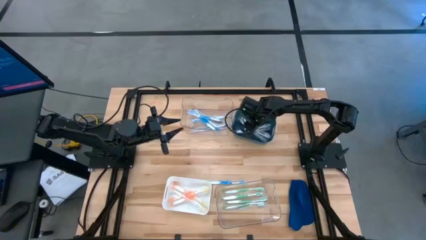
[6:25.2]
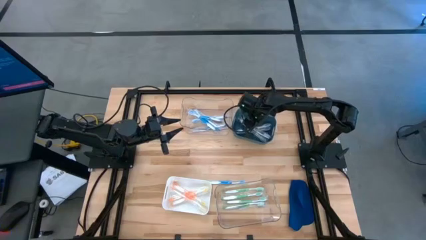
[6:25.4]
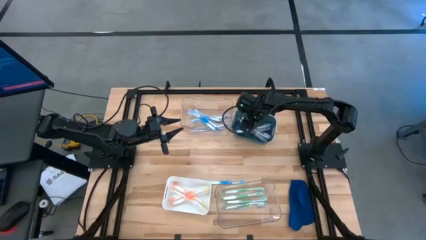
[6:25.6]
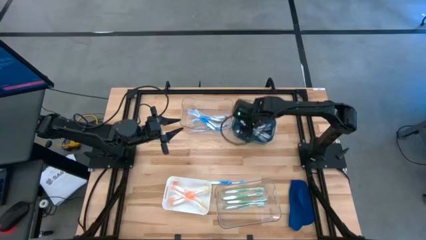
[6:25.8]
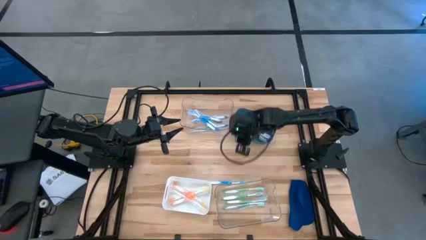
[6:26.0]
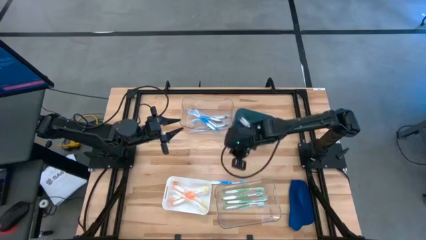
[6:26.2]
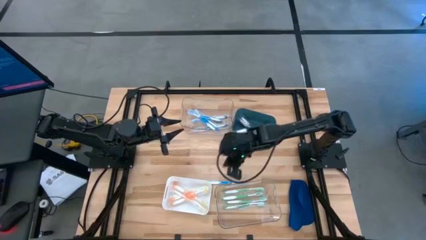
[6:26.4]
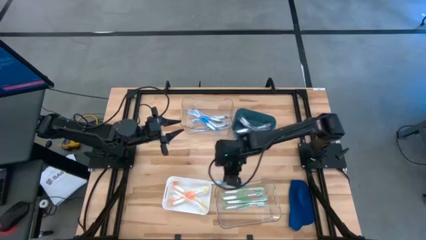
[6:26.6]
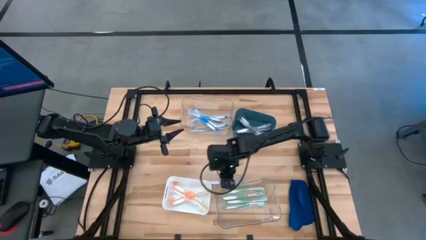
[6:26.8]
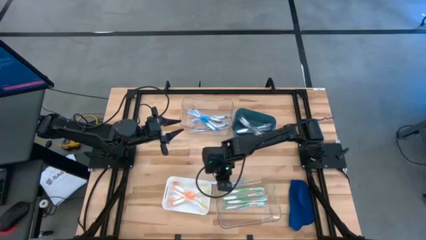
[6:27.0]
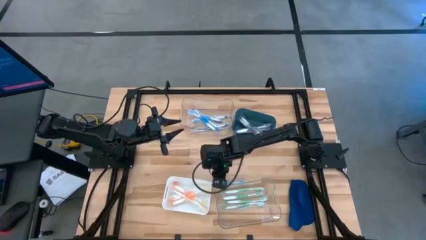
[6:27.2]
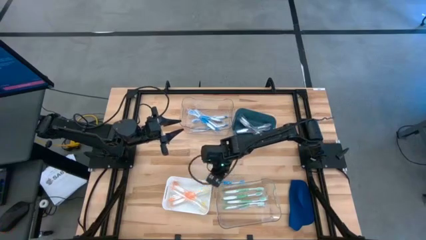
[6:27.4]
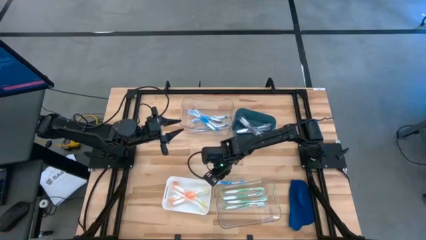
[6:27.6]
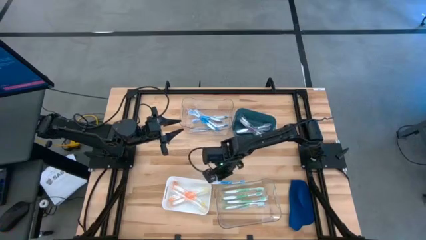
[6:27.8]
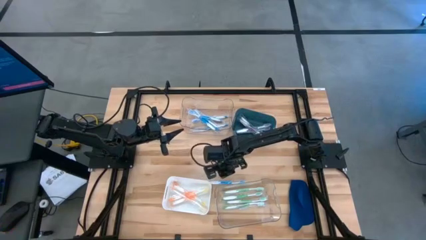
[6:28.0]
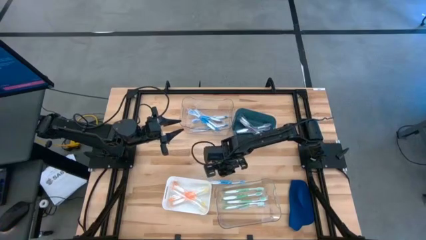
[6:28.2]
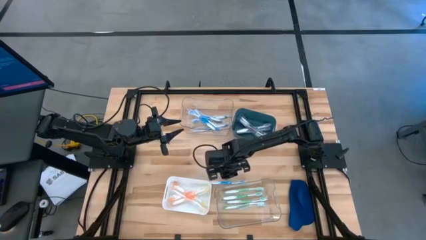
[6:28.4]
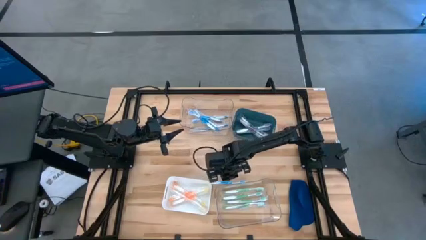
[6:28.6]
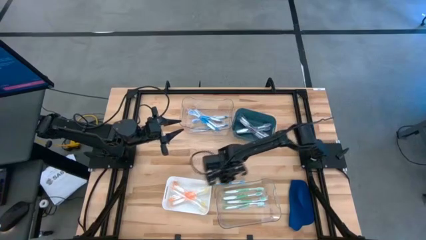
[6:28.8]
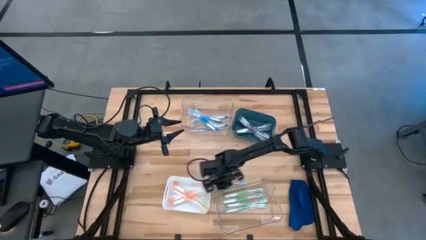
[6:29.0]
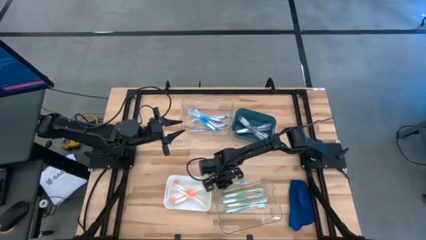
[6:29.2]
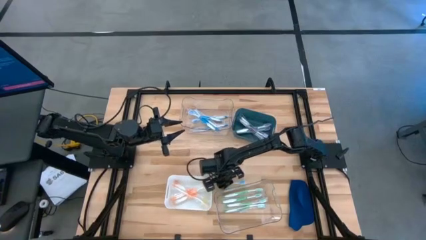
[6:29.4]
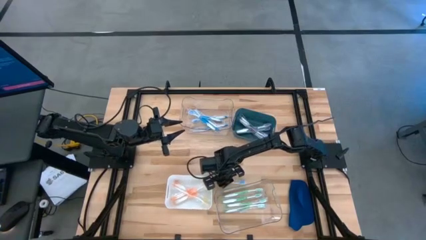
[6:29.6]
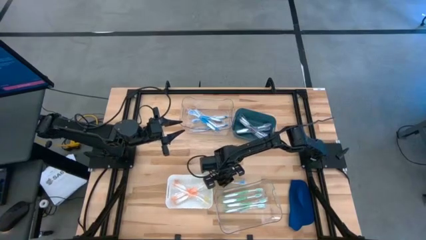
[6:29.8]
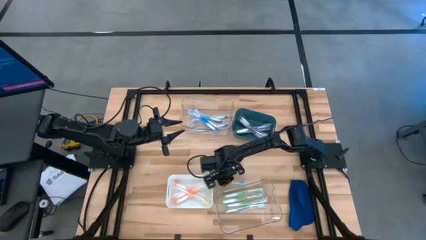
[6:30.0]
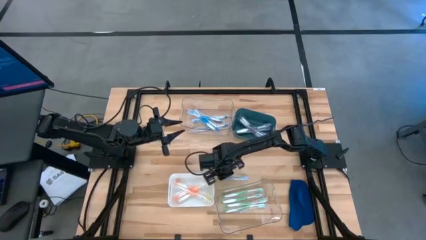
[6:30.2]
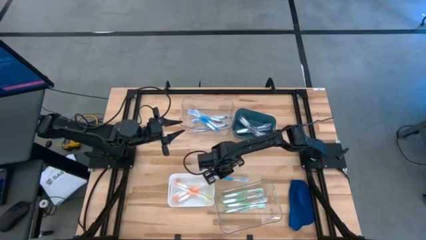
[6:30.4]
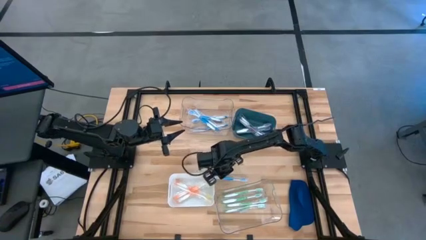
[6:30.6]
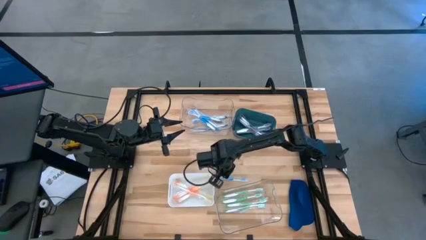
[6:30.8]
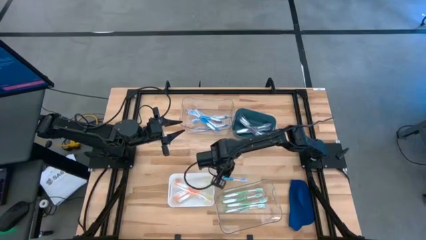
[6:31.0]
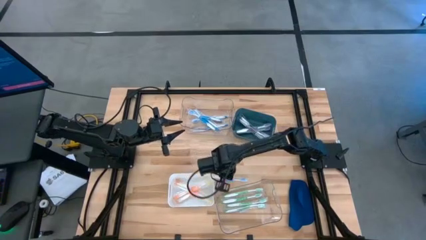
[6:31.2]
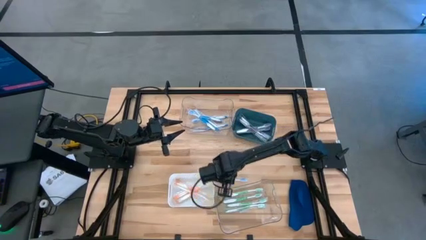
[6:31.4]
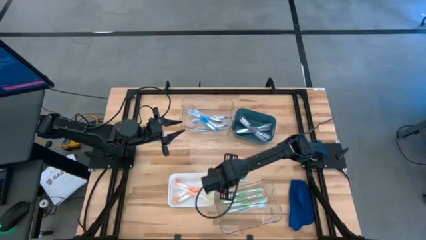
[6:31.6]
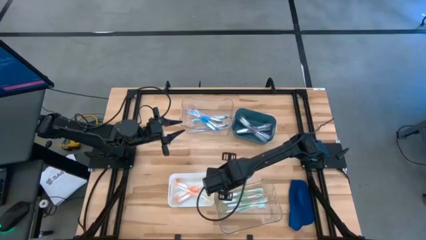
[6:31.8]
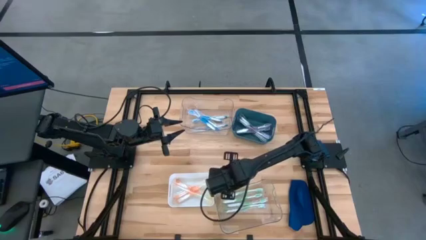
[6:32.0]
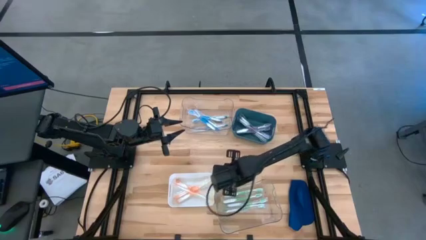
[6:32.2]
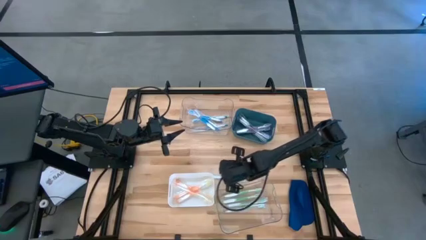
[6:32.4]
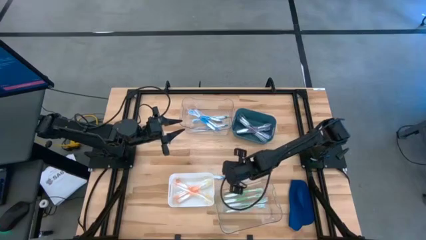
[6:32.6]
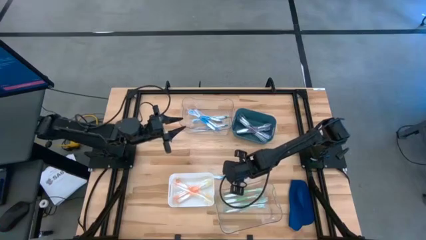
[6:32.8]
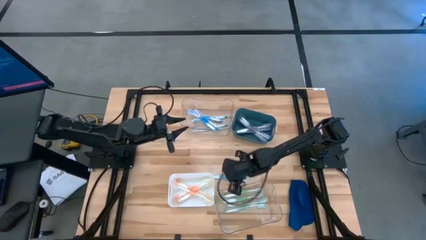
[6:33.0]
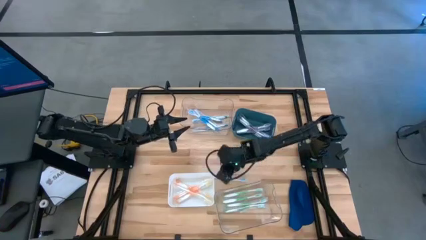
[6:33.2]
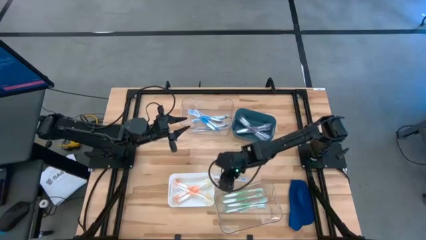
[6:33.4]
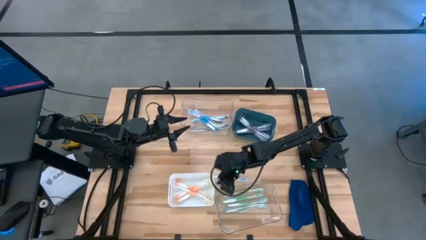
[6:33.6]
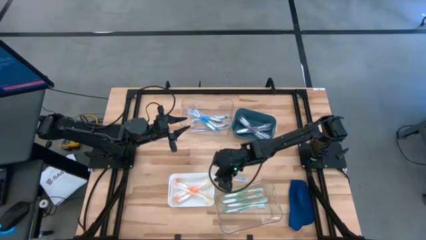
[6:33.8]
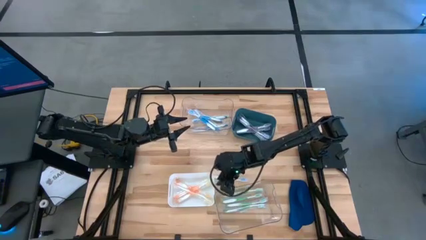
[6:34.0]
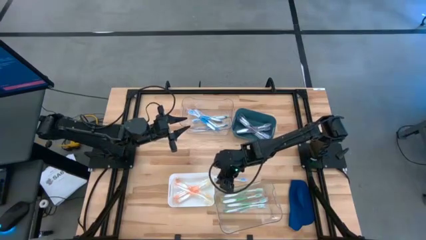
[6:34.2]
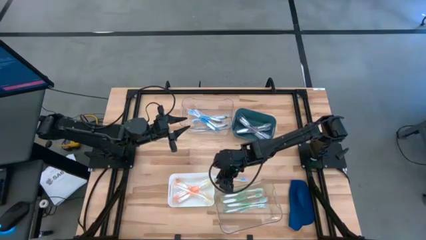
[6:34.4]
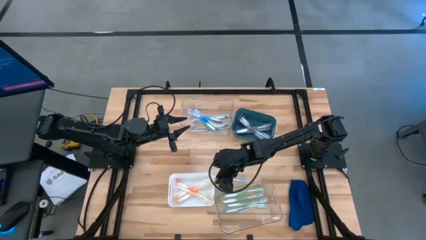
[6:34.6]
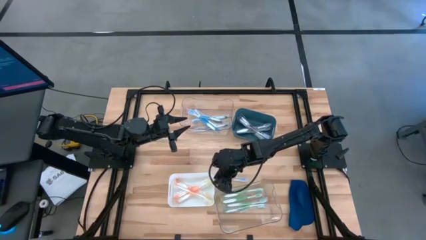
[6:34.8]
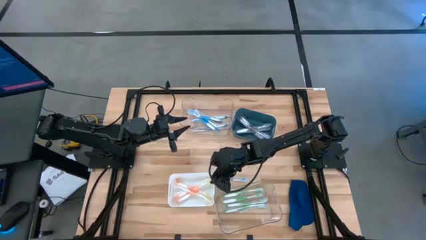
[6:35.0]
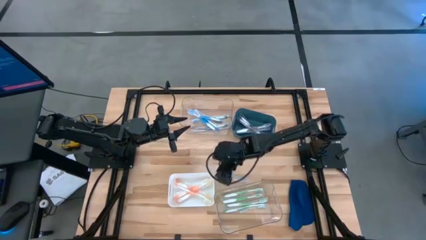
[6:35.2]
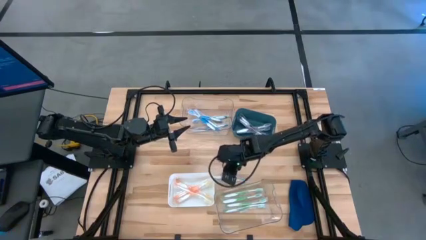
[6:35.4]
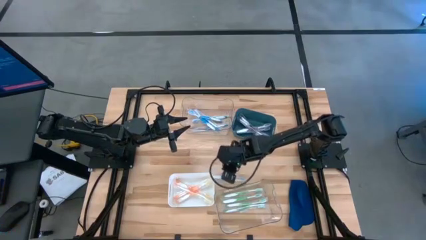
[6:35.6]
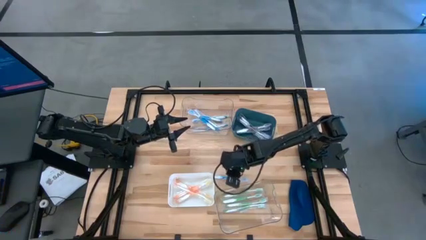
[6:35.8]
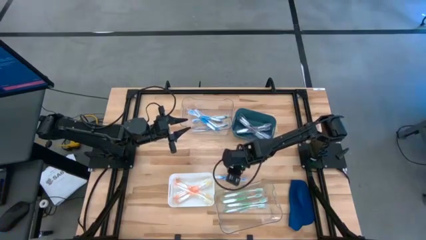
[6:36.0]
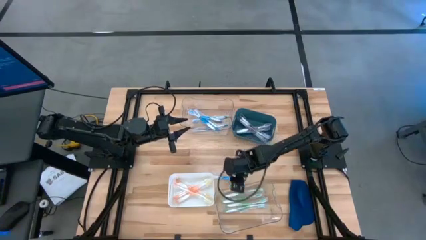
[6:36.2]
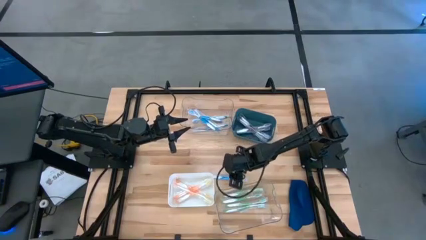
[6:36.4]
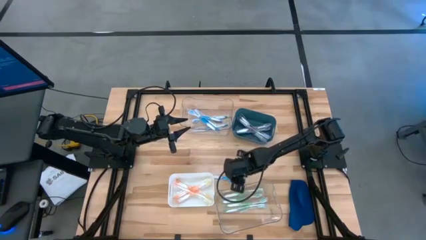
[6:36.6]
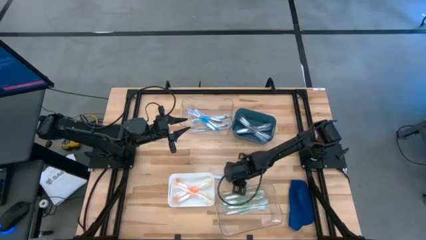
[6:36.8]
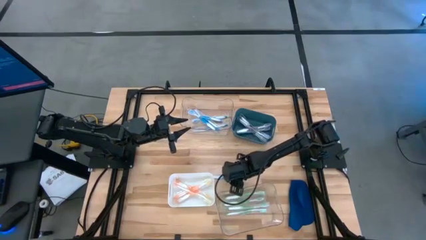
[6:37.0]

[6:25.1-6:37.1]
Task: Pick & Place Toothbrushes
Put the blue toothbrush into the top transparent bin
